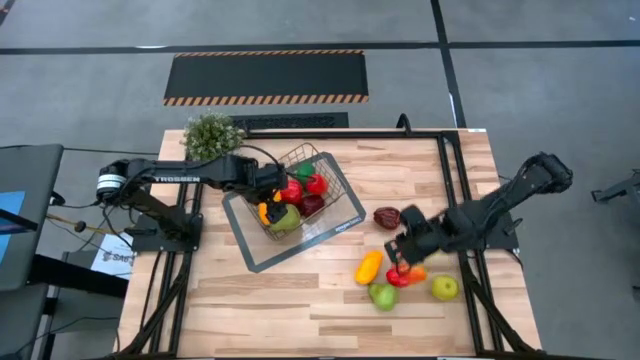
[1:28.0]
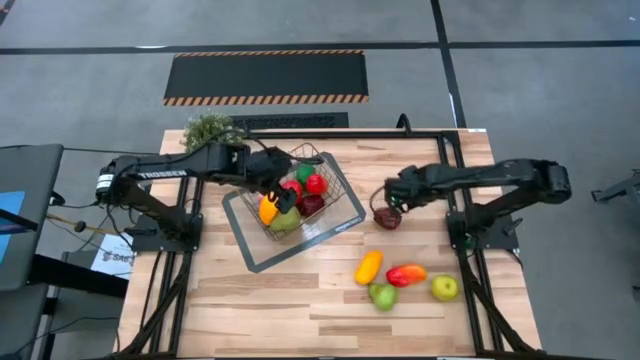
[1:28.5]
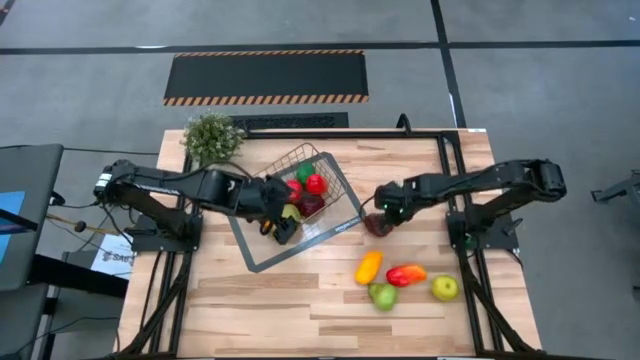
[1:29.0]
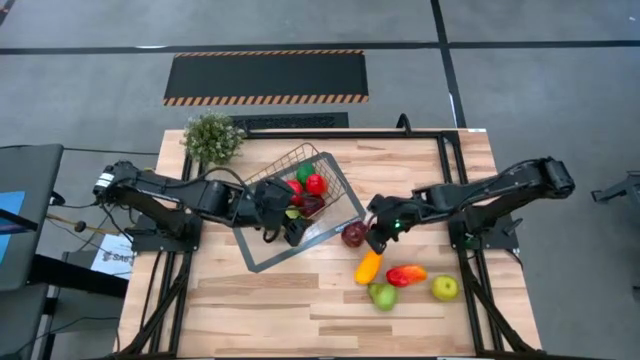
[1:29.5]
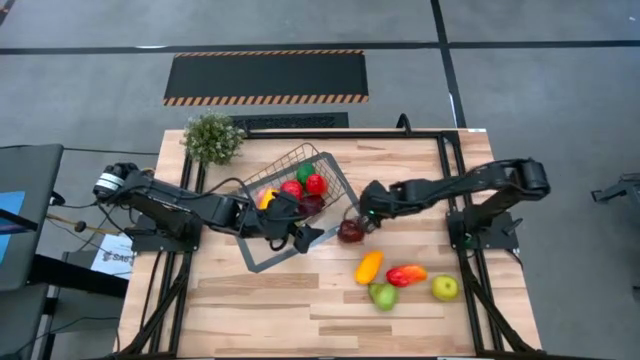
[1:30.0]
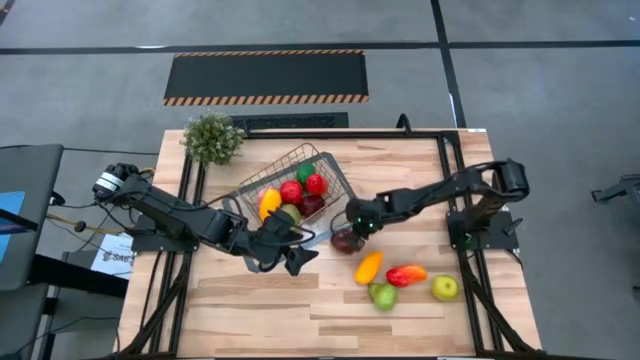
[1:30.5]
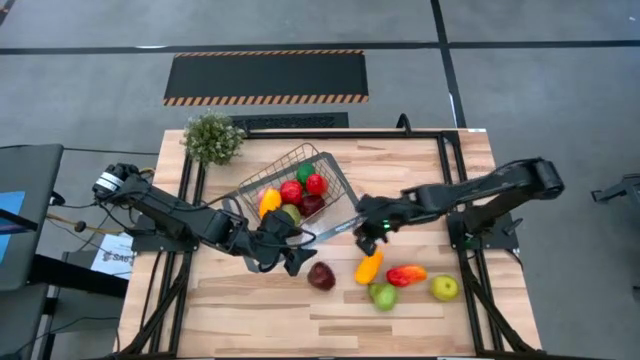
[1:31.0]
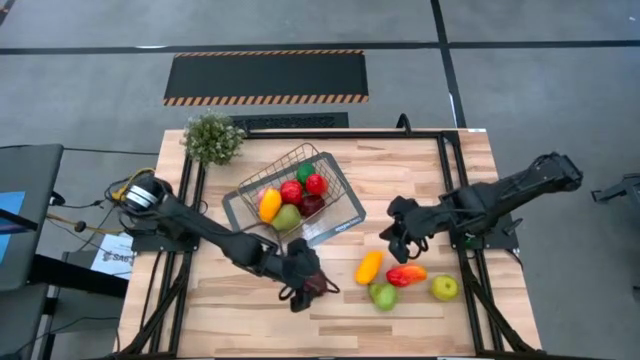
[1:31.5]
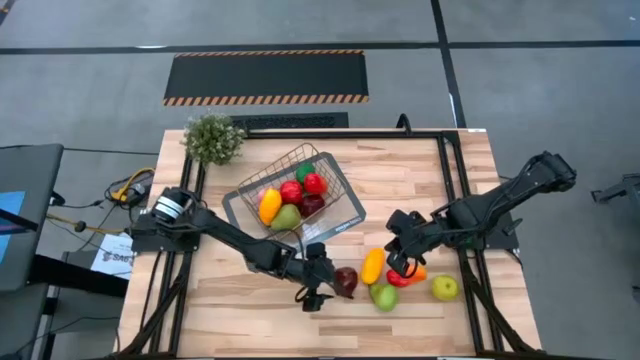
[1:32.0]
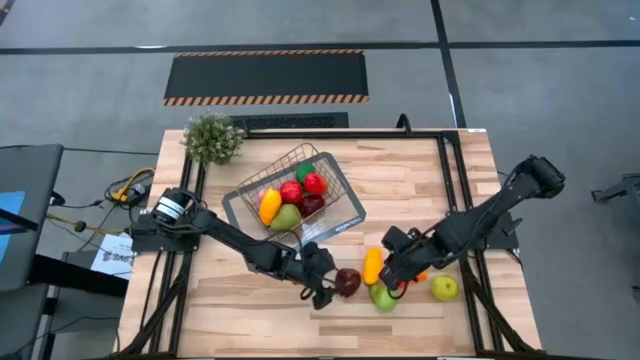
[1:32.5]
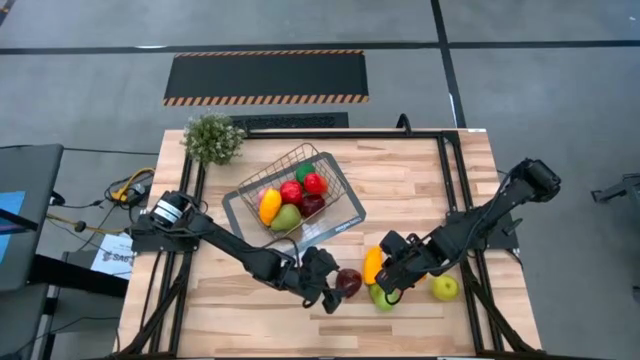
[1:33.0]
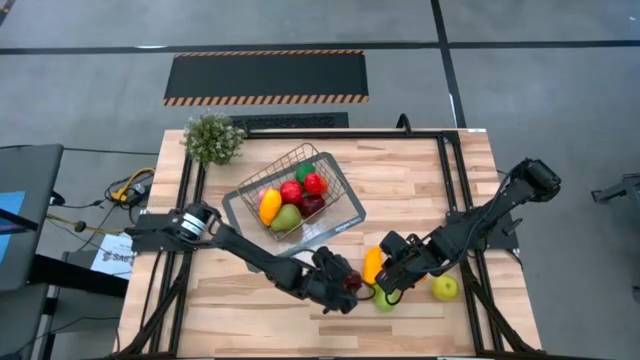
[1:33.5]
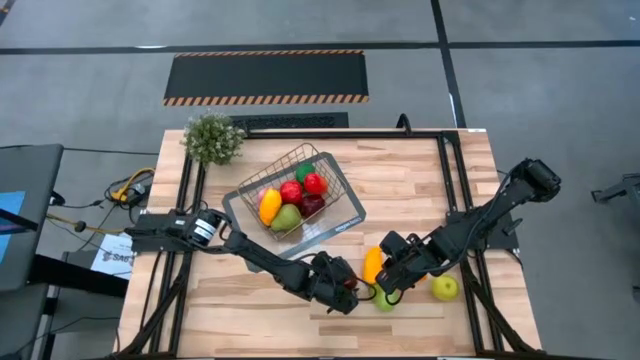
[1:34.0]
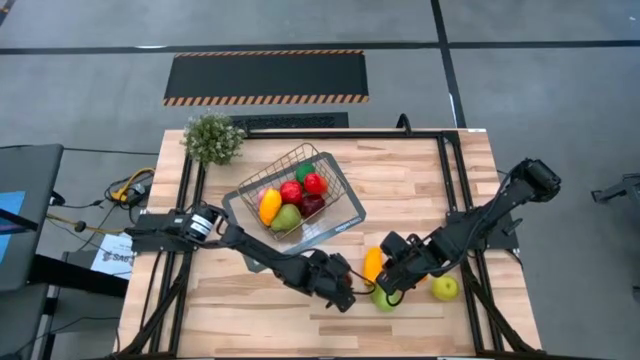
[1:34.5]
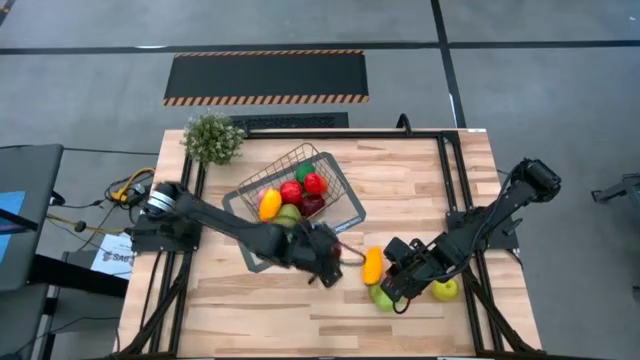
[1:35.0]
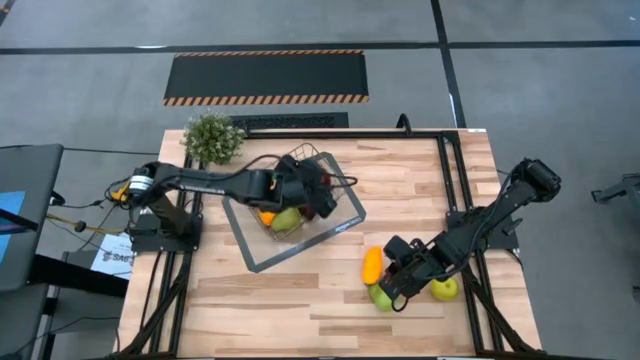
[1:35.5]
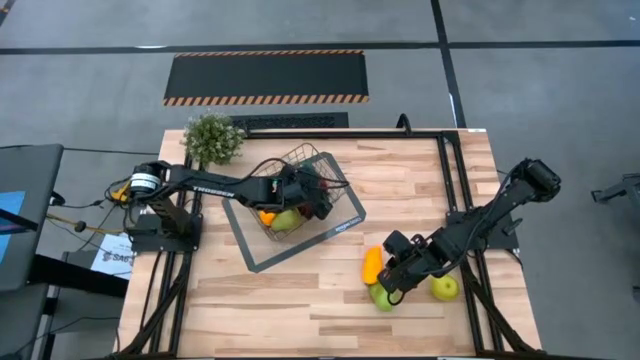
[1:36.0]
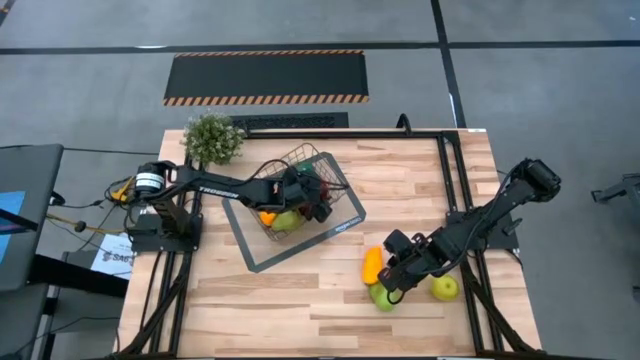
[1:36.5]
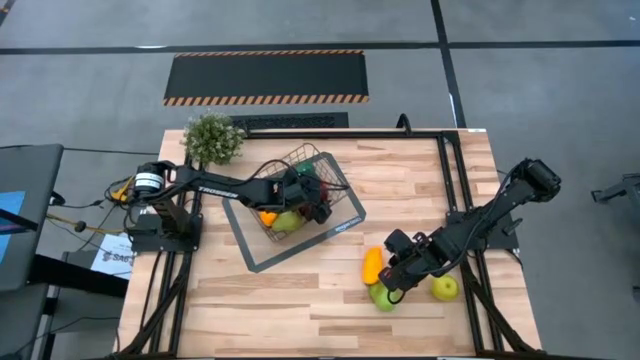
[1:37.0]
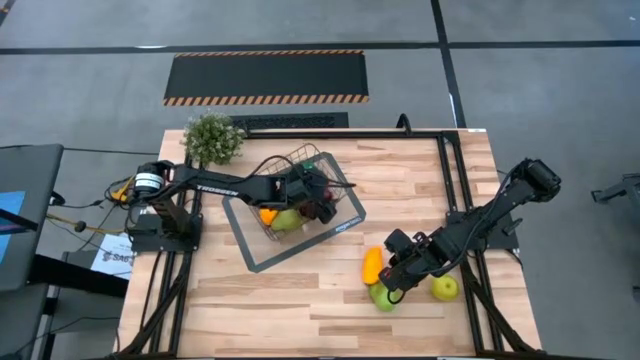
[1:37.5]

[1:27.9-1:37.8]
Task: Build produce basket
Put the dark red apple into the gold wire basket

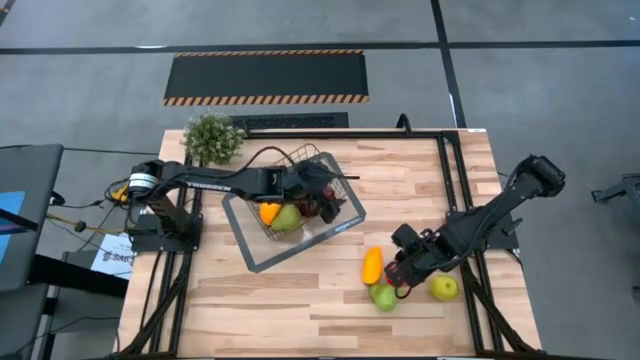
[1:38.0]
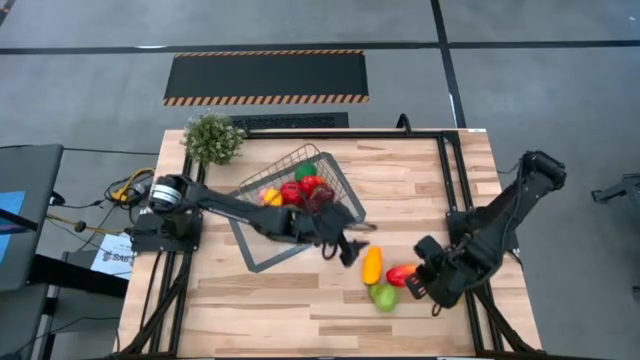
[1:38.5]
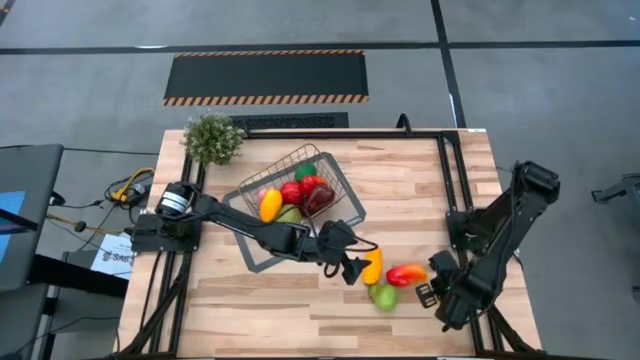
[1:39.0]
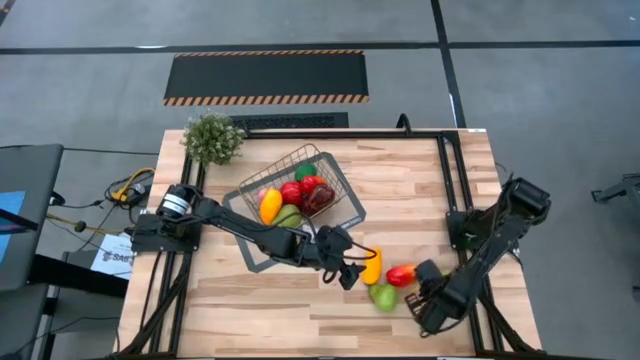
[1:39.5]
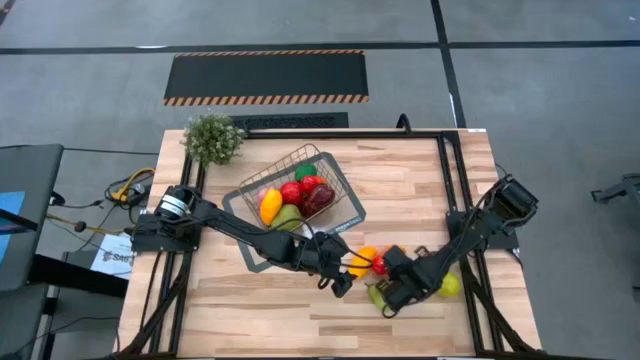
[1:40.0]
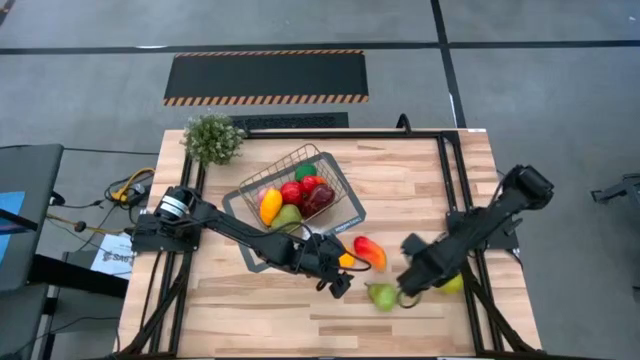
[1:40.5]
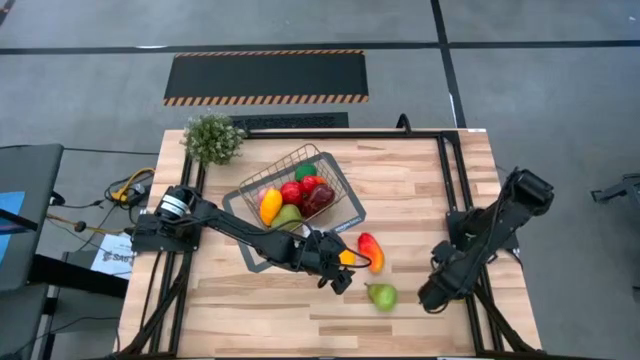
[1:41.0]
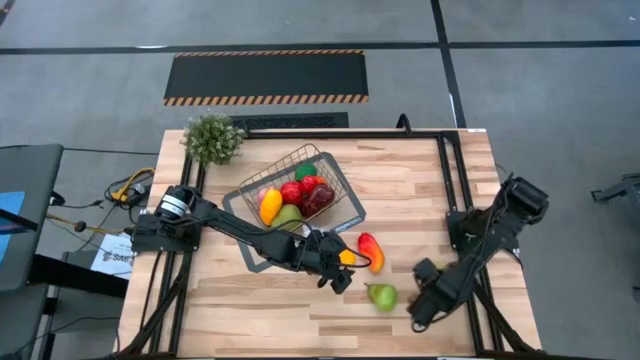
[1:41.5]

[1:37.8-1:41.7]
Adjust the fruits on the table

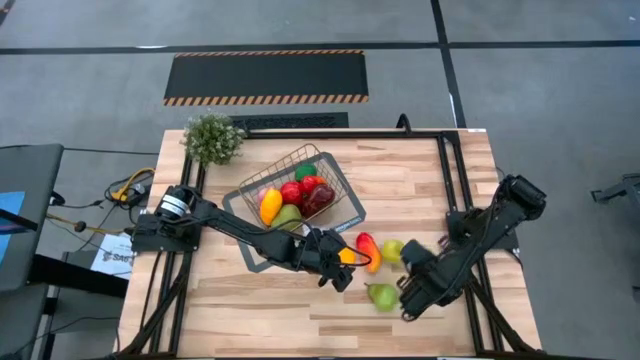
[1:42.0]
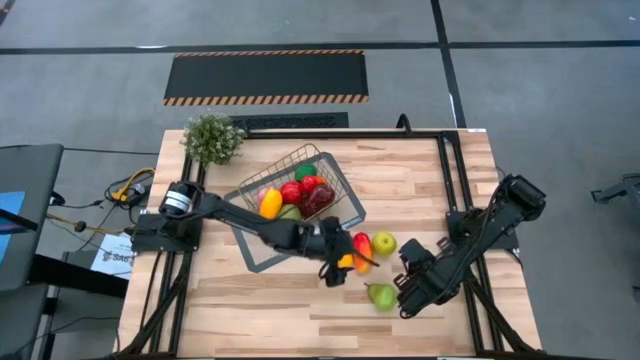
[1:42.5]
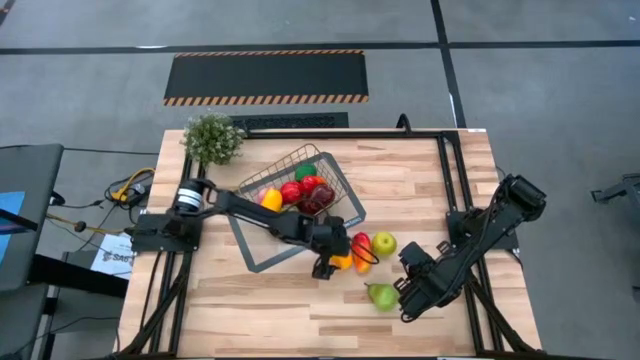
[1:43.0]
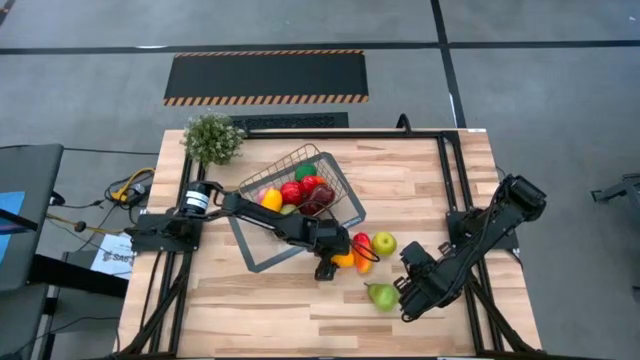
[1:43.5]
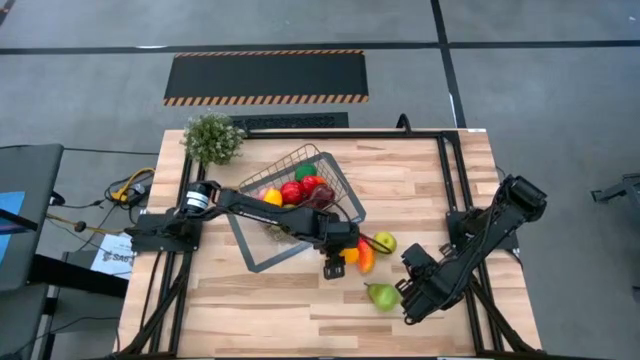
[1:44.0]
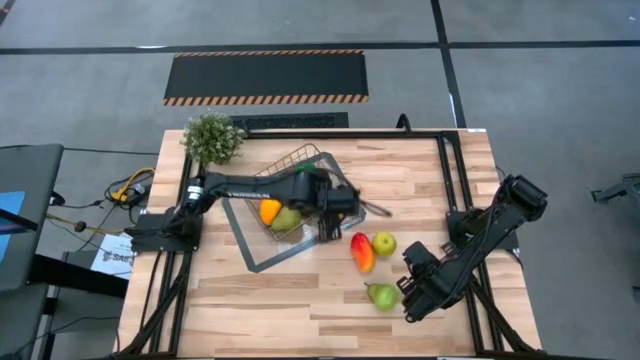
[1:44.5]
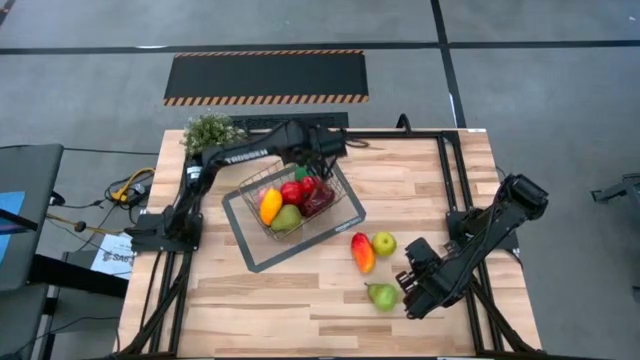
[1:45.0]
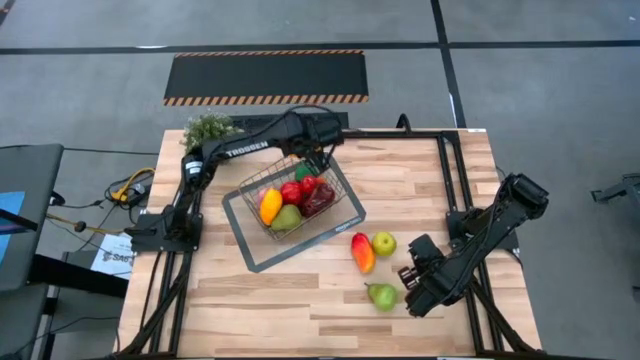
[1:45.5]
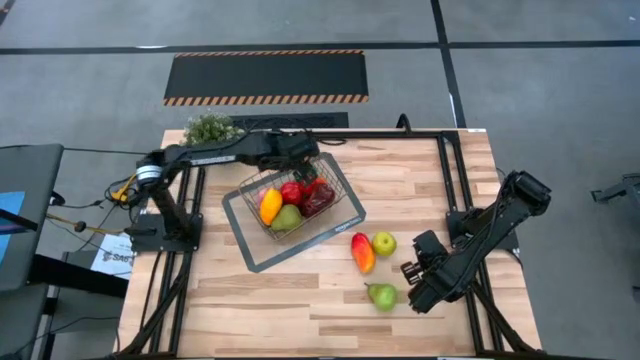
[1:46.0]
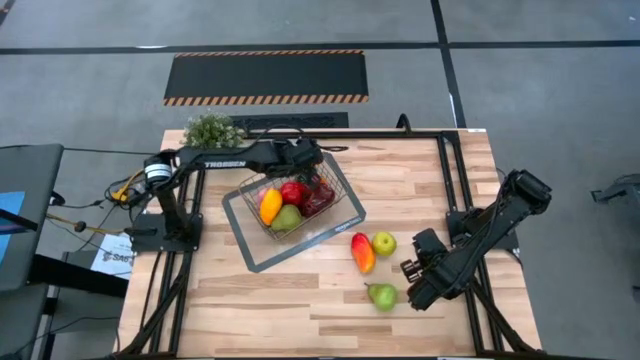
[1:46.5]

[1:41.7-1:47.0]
Put the yellow mango into the gold wire basket

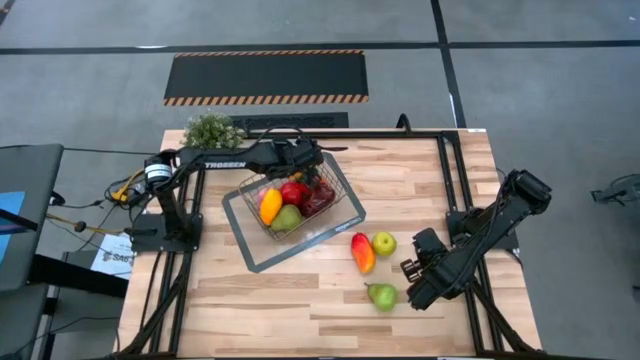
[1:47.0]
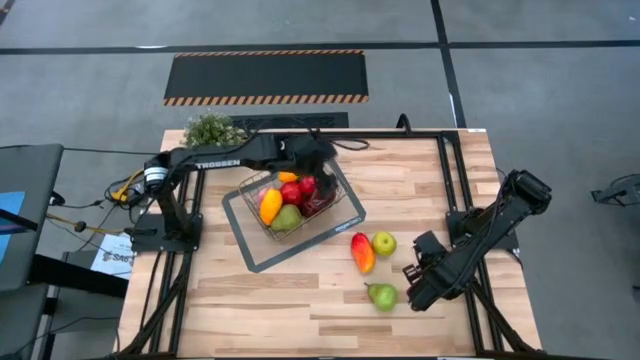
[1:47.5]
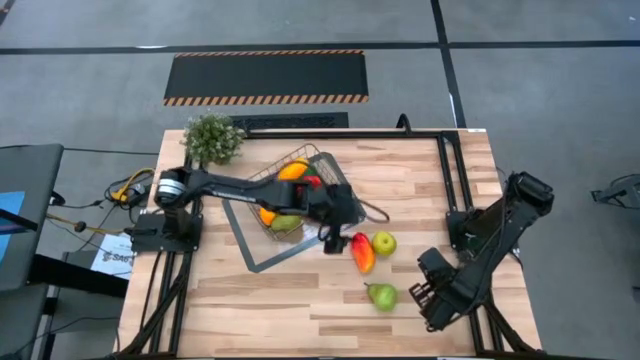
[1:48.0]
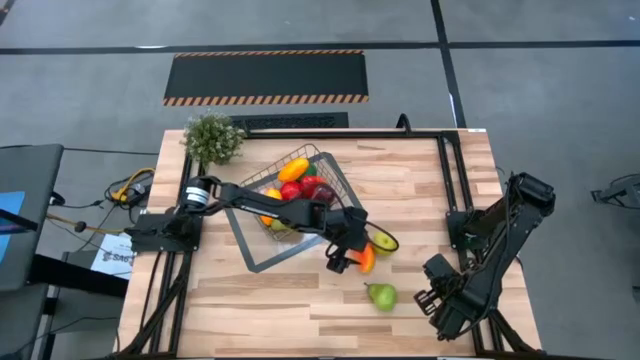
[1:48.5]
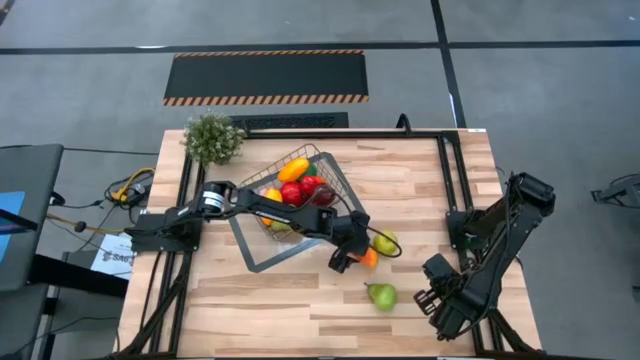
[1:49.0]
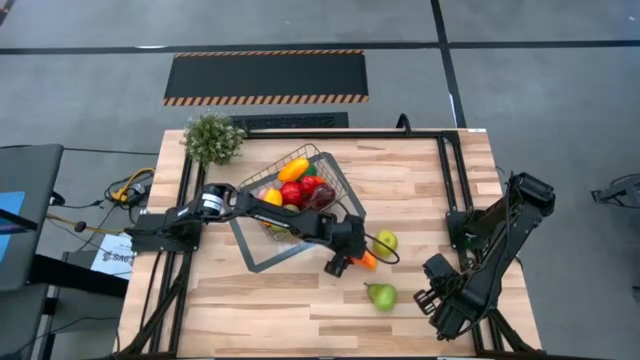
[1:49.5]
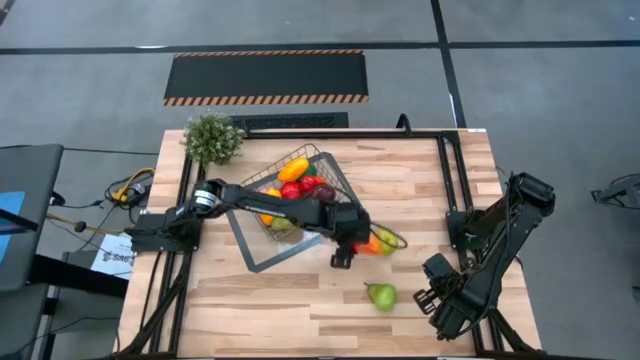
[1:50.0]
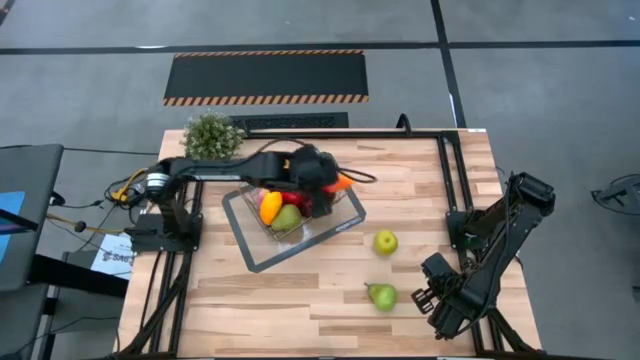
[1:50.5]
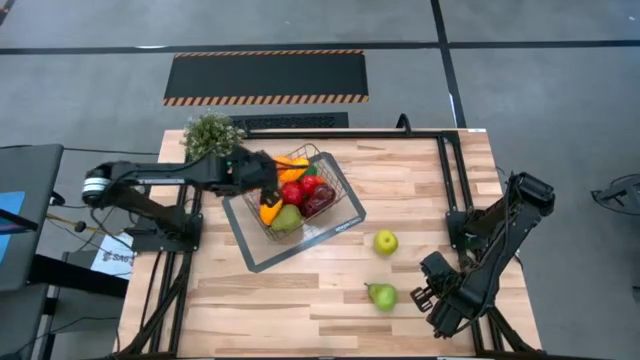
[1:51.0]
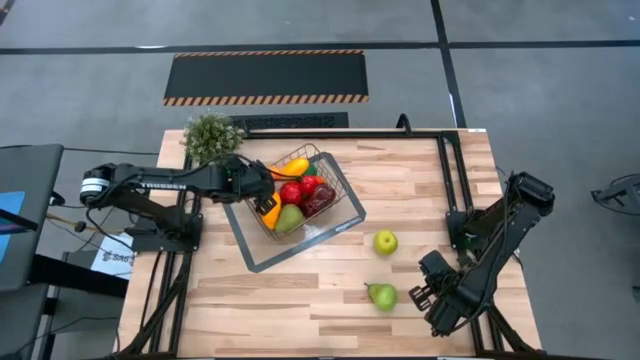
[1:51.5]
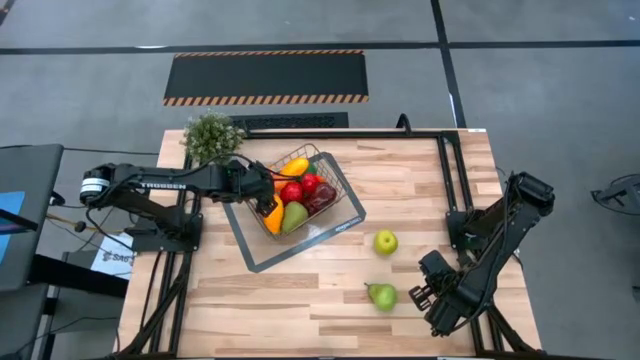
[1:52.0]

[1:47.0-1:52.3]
Put the red and yellow mango into the gold wire basket
